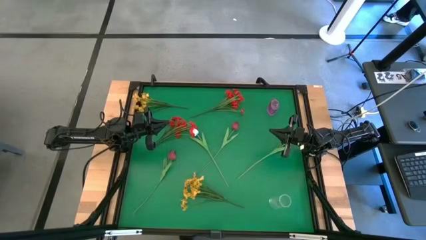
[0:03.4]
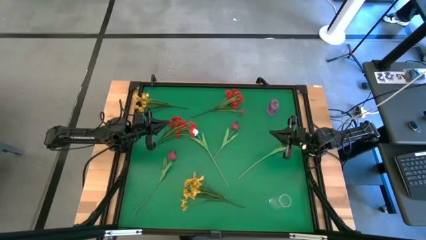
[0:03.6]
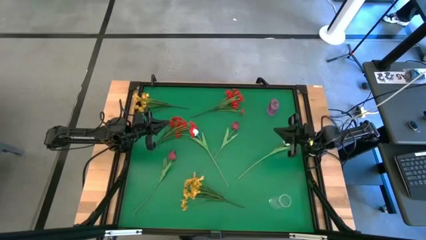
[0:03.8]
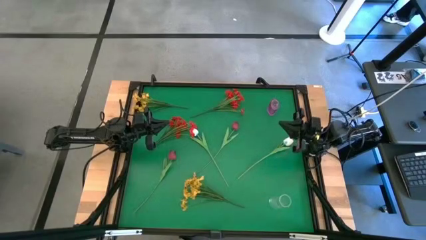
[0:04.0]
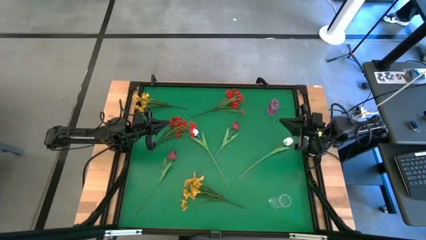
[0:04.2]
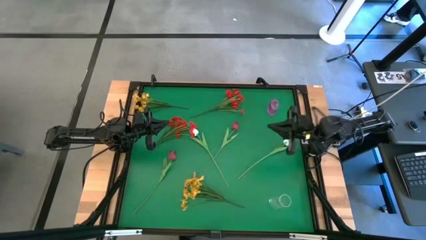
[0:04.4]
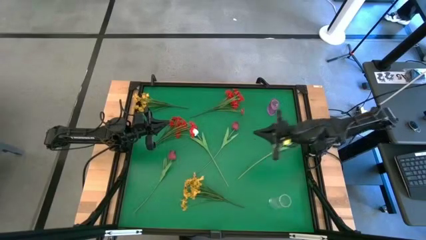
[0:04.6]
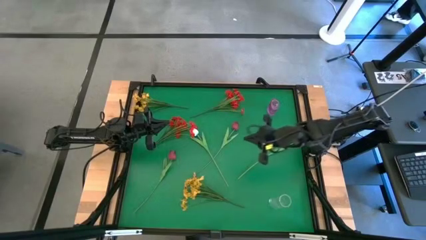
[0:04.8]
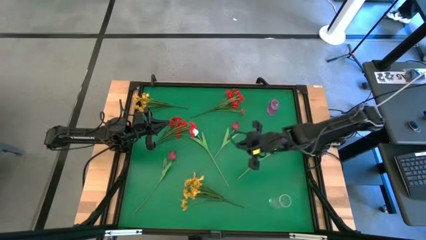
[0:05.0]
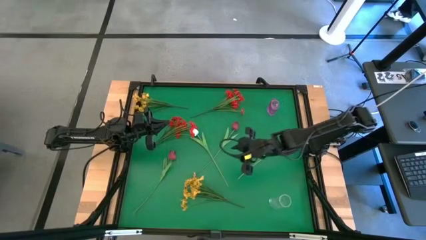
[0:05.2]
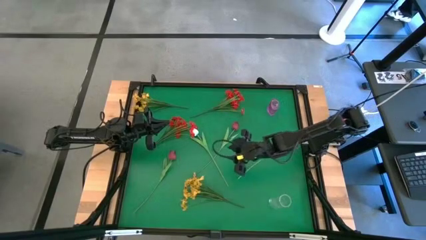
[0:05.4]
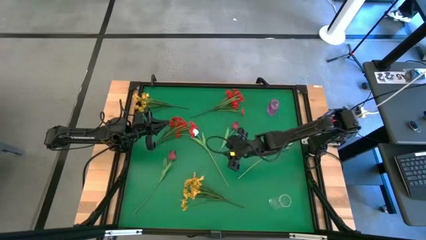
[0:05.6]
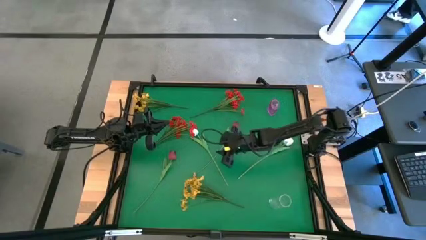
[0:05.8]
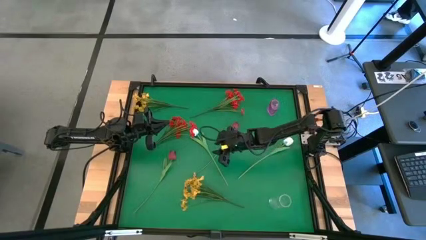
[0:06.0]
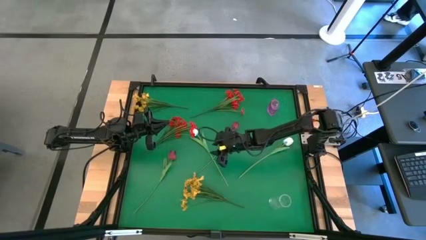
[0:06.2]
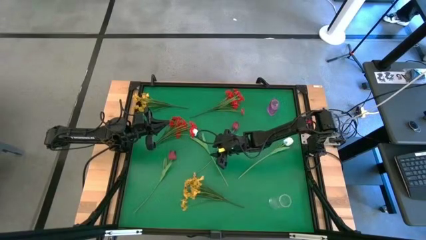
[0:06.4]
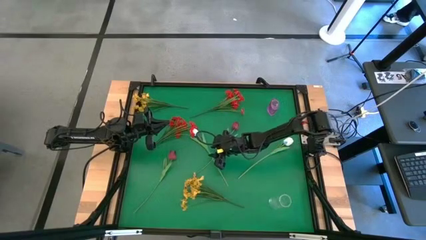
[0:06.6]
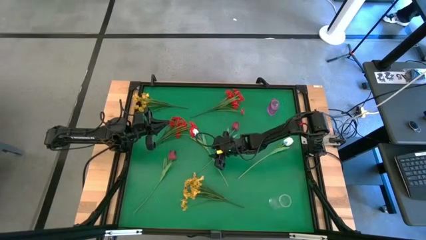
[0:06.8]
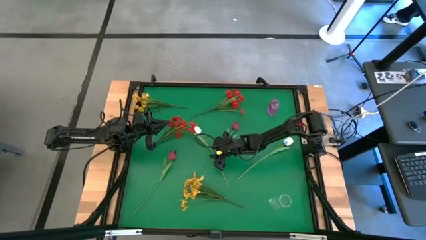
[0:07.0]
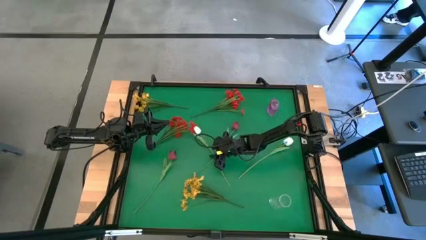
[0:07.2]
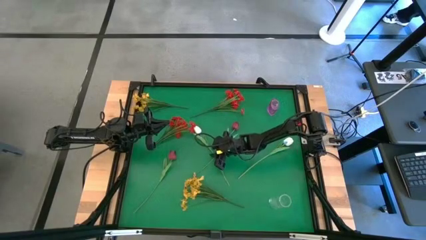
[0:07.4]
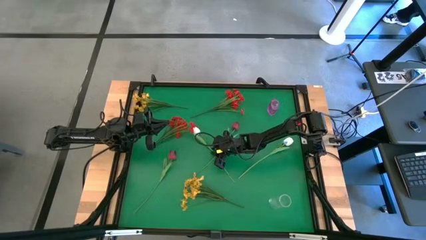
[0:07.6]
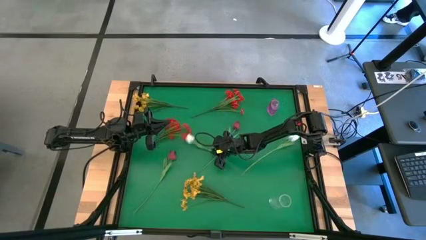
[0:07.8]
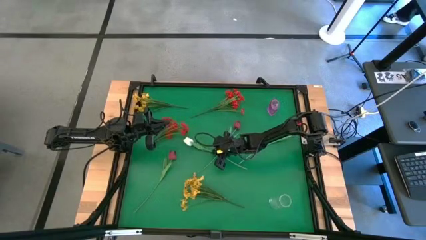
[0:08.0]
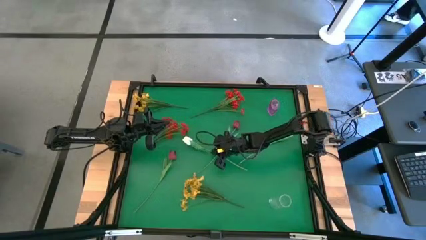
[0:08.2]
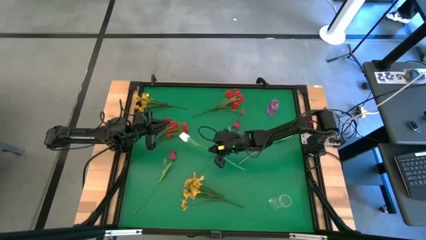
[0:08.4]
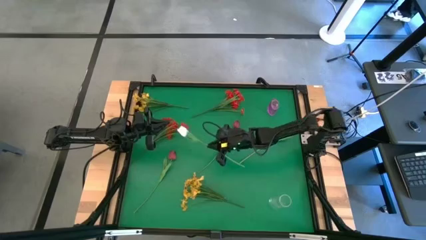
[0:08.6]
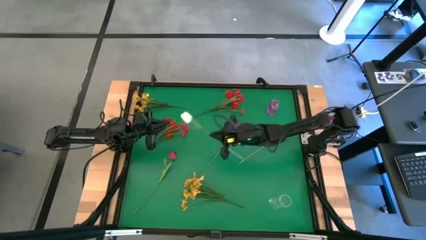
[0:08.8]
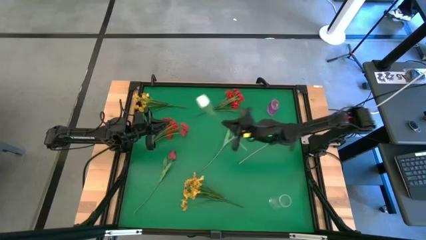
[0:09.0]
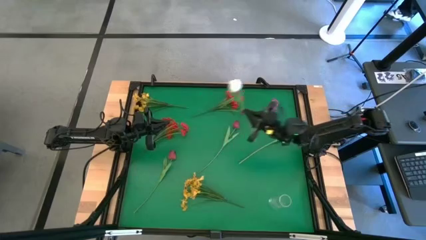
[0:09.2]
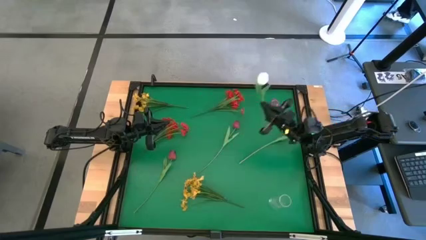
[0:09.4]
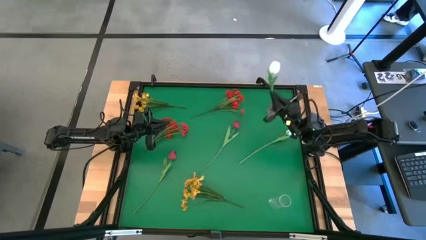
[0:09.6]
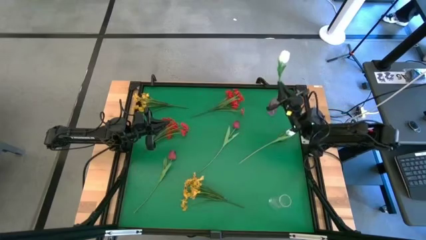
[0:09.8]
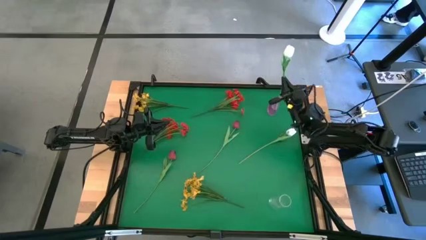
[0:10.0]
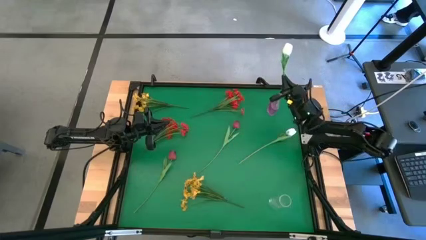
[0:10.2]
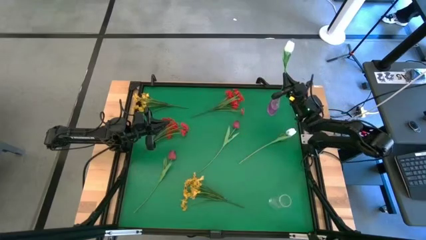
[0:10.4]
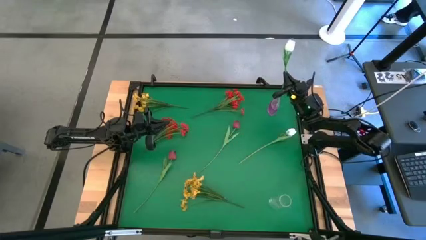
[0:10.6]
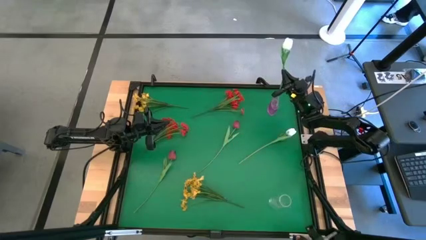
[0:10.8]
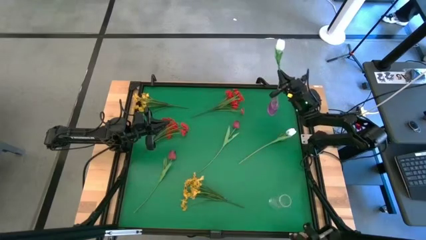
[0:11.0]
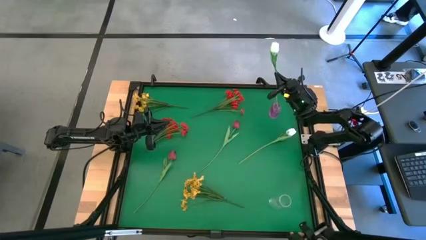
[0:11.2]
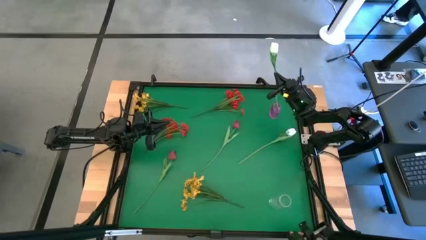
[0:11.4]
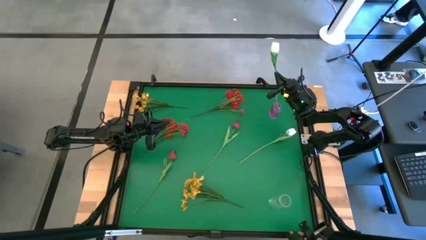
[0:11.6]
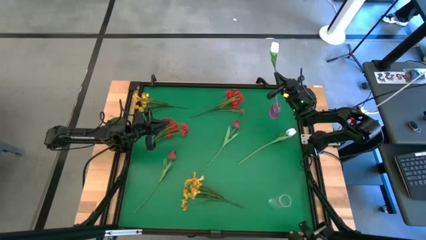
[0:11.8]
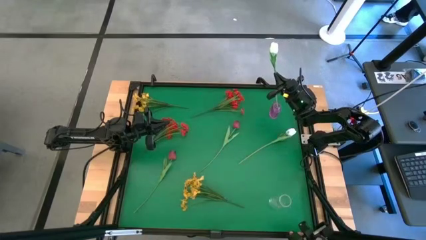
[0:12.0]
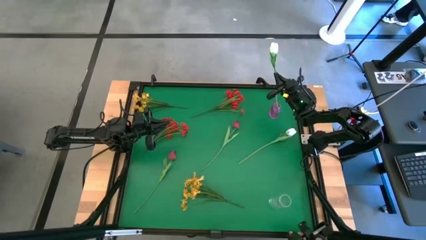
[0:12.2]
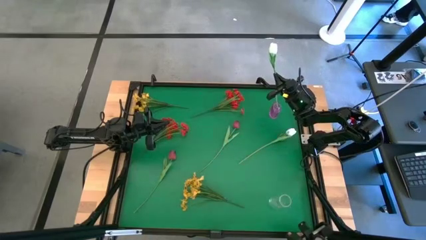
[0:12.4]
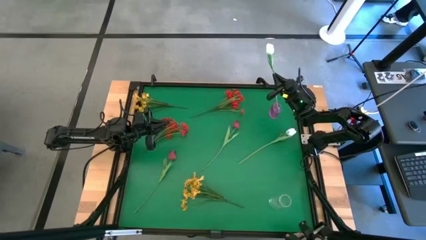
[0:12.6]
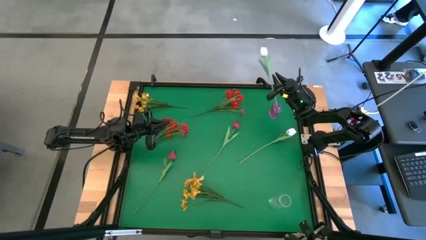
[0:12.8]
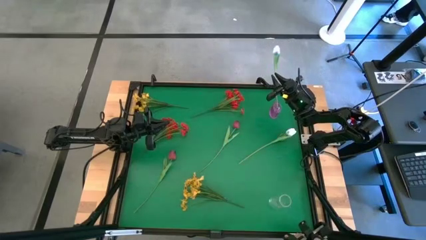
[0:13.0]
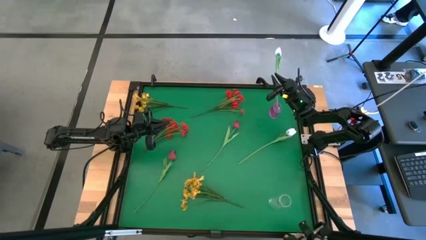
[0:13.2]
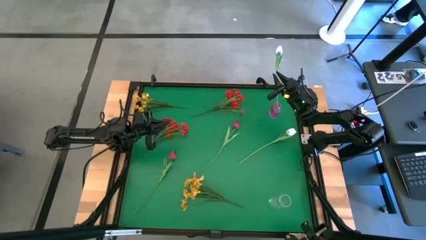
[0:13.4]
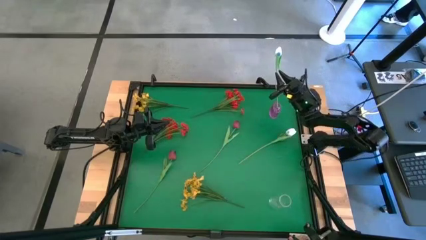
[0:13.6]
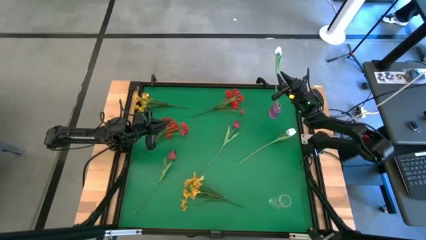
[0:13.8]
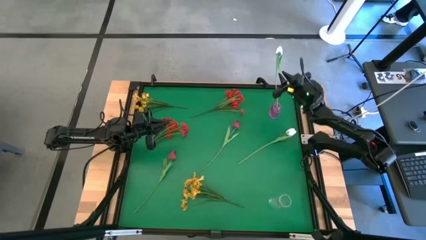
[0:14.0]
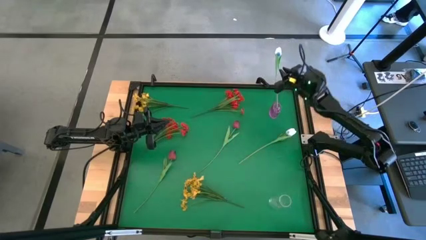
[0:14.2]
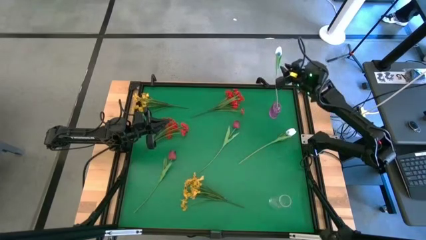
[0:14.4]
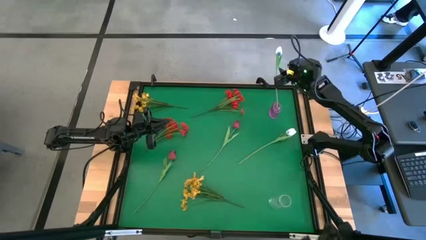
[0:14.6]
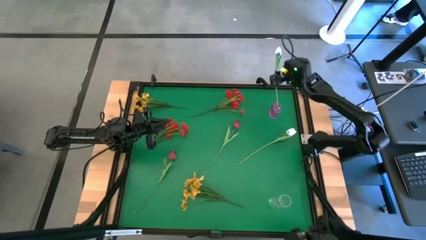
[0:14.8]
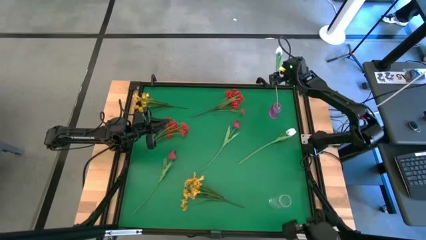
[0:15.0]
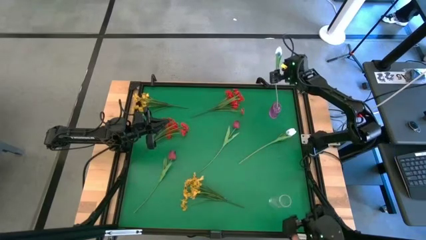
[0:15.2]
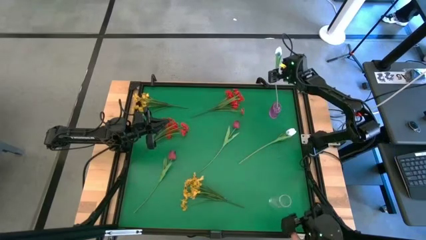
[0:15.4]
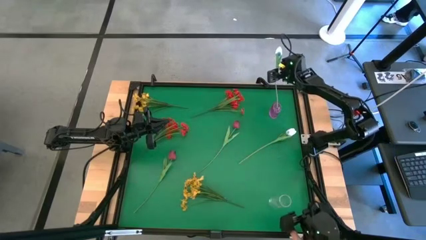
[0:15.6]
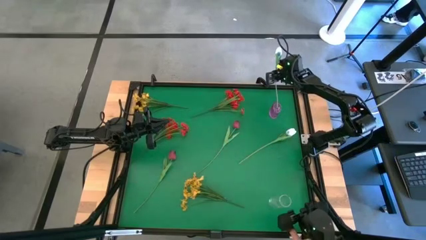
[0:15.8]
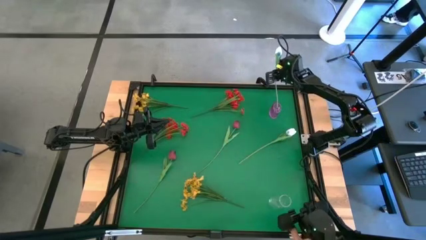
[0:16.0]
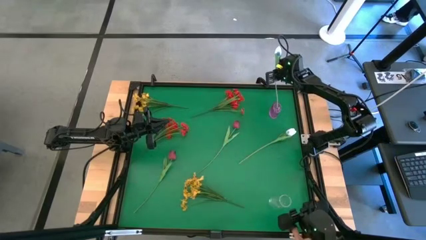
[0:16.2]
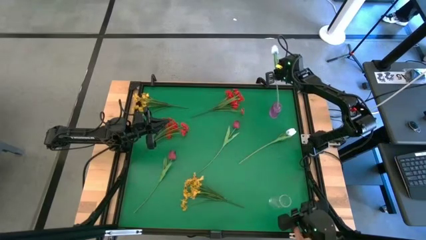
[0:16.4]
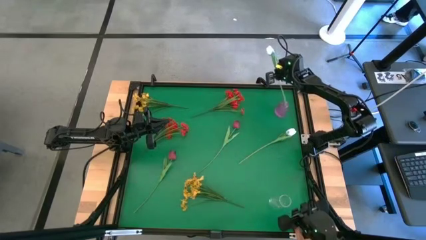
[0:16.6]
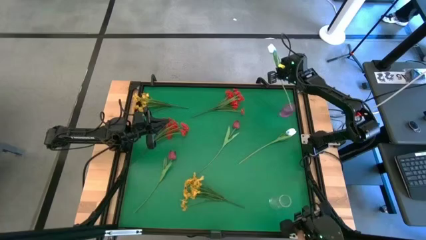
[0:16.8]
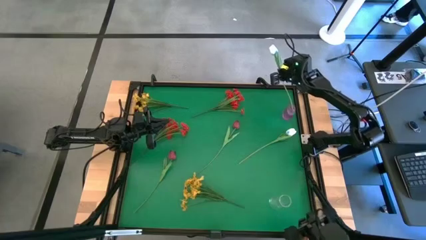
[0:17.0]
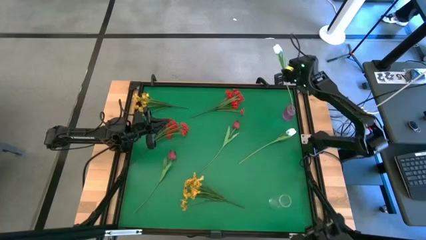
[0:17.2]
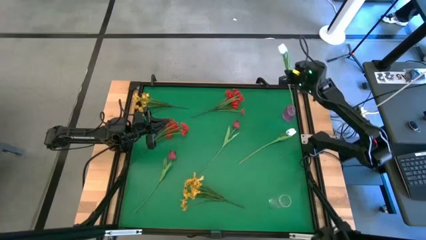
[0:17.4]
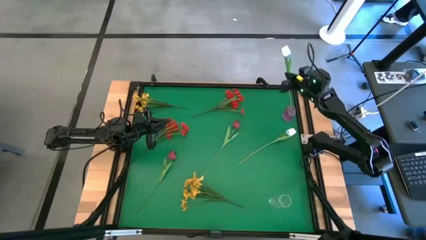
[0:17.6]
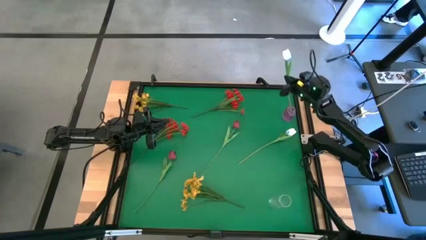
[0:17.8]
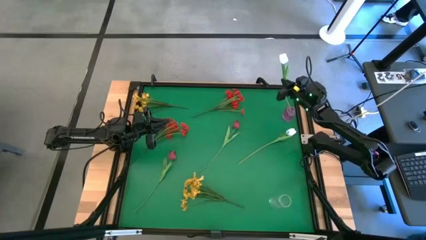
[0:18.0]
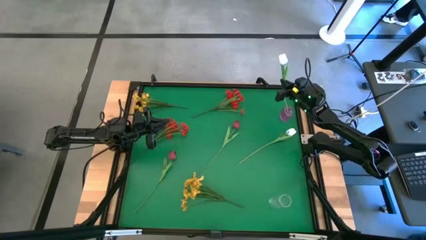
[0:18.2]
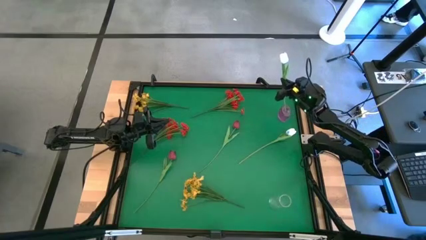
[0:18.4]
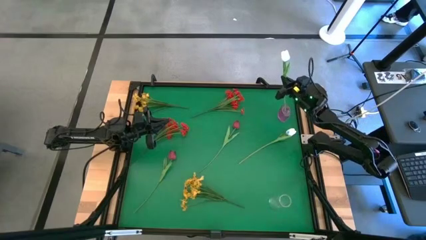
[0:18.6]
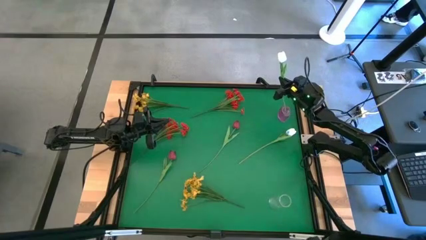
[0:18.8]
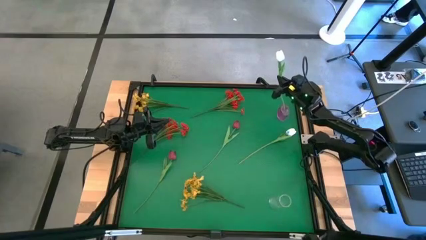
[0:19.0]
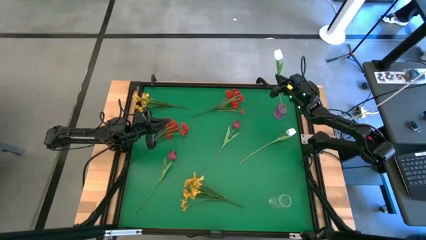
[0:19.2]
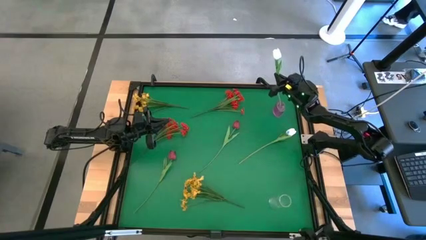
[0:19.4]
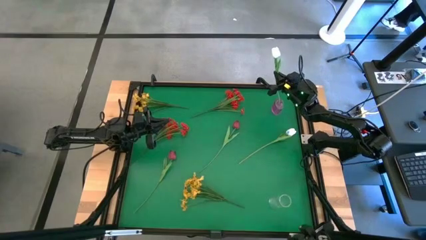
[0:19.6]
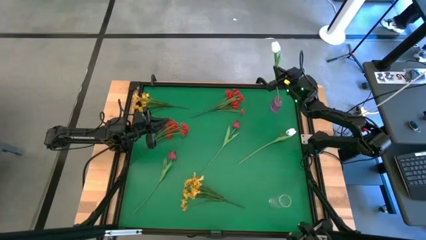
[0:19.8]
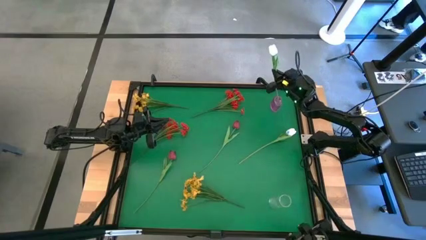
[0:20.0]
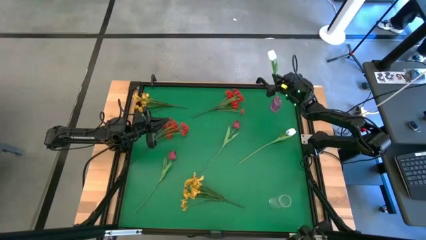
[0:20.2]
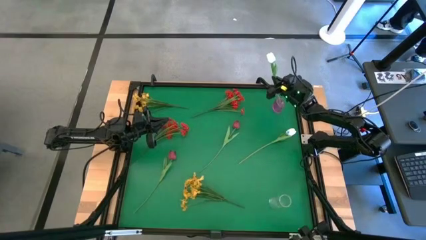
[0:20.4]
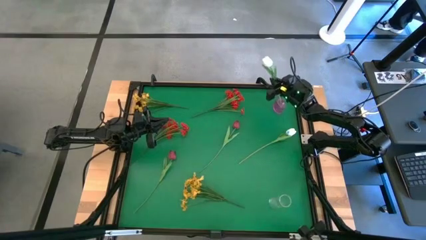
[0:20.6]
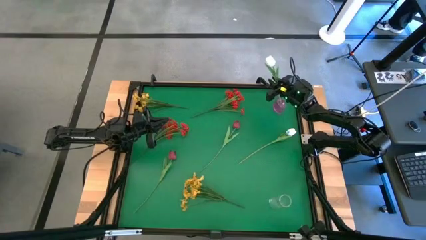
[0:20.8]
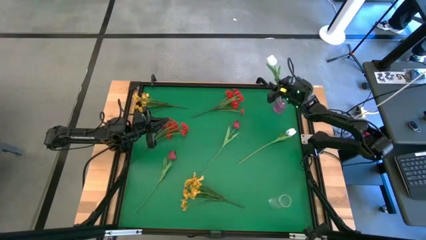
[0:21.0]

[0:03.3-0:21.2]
Task: Sort flowers into vase by color
Put the left white tulip into the purple vase
